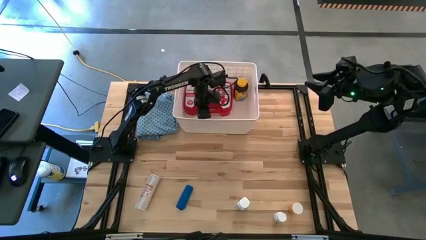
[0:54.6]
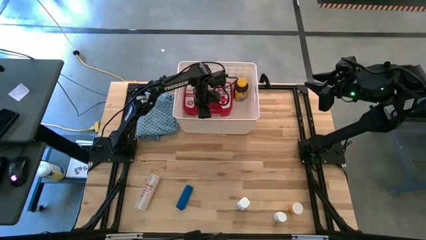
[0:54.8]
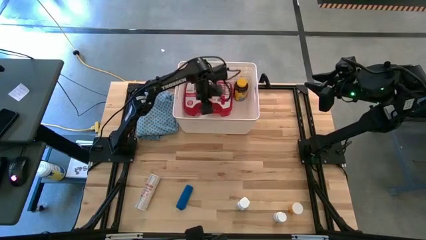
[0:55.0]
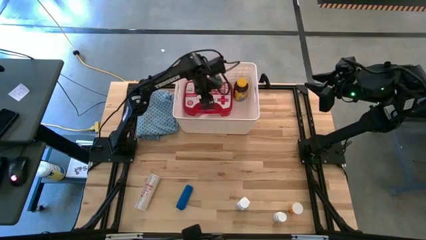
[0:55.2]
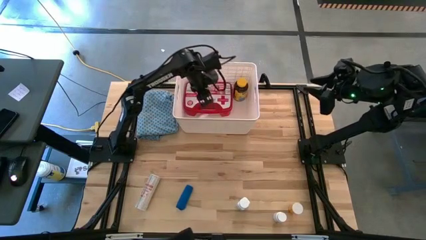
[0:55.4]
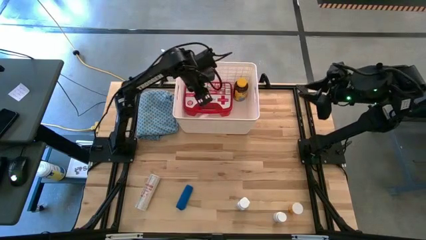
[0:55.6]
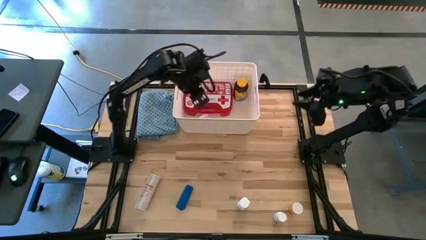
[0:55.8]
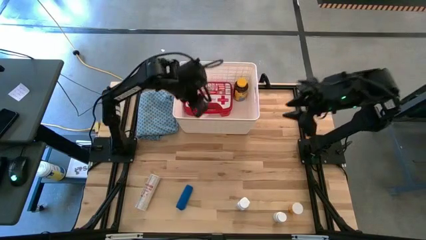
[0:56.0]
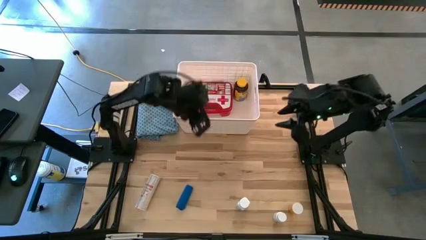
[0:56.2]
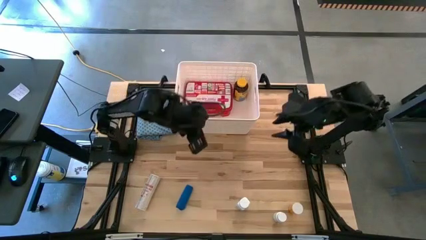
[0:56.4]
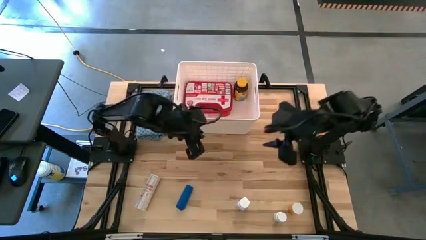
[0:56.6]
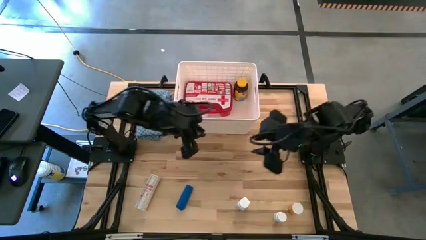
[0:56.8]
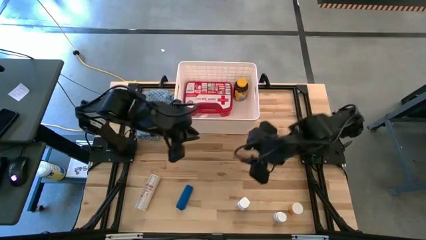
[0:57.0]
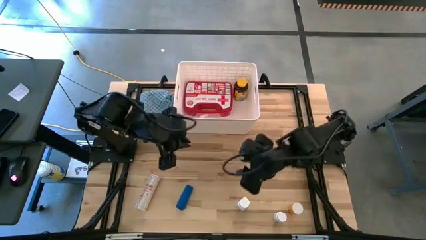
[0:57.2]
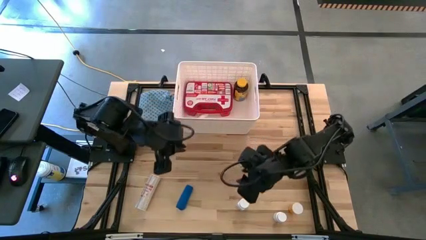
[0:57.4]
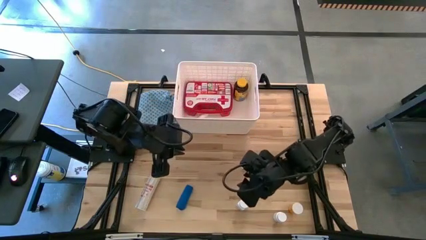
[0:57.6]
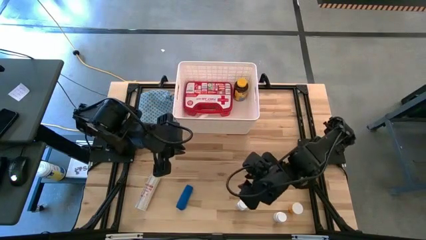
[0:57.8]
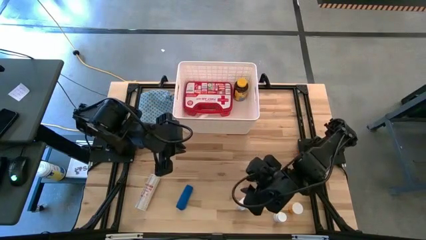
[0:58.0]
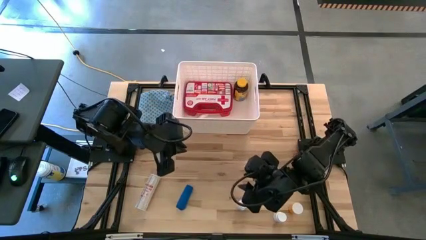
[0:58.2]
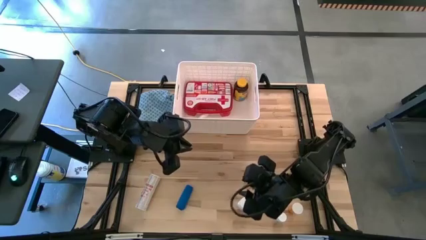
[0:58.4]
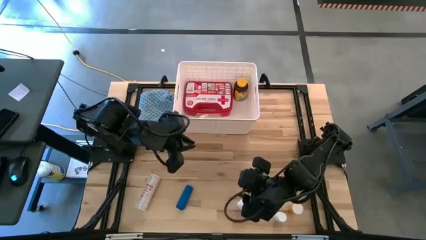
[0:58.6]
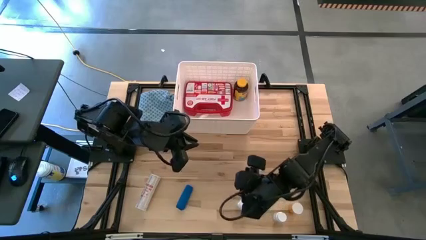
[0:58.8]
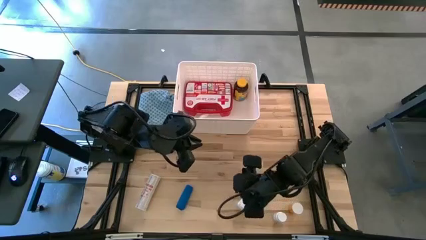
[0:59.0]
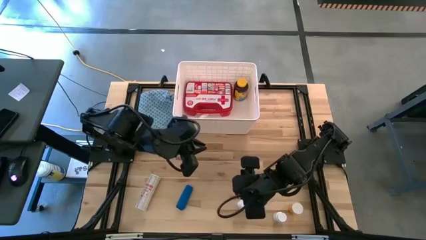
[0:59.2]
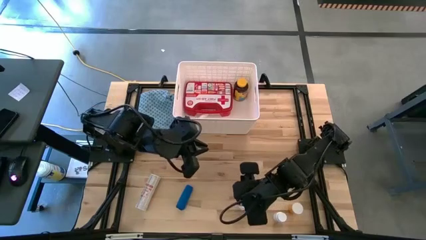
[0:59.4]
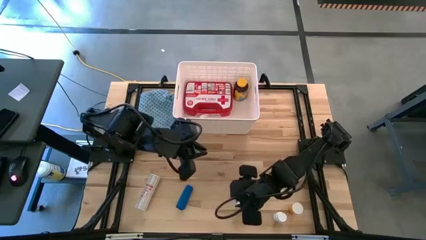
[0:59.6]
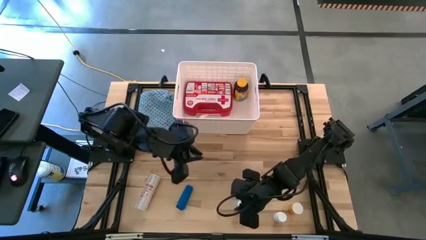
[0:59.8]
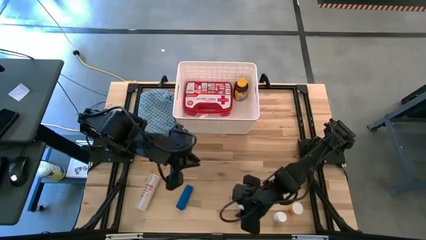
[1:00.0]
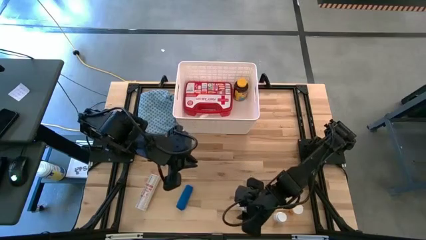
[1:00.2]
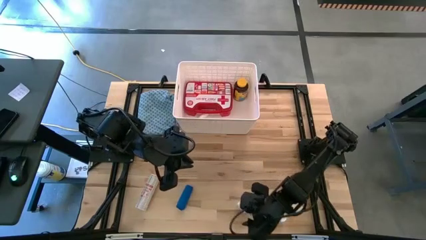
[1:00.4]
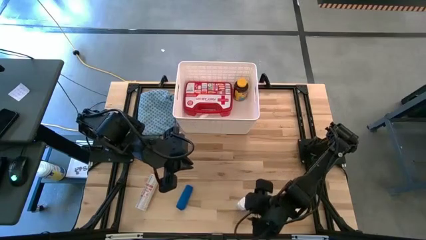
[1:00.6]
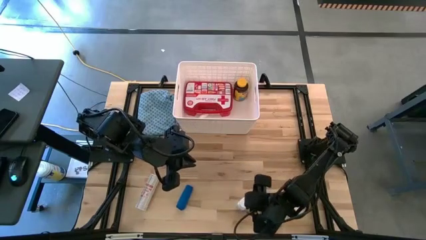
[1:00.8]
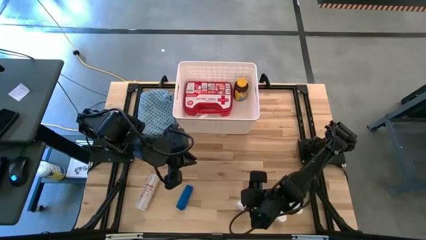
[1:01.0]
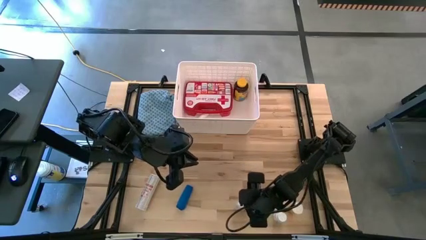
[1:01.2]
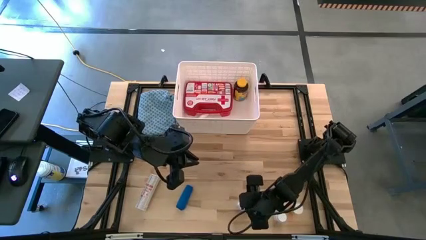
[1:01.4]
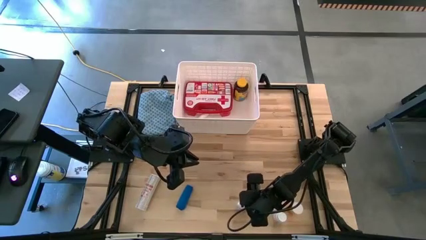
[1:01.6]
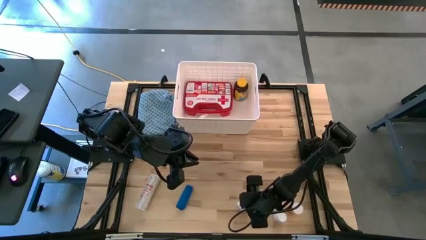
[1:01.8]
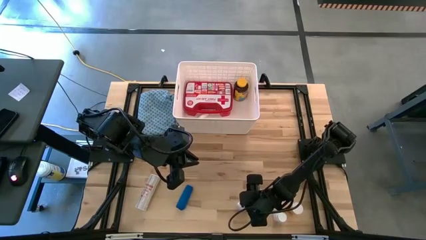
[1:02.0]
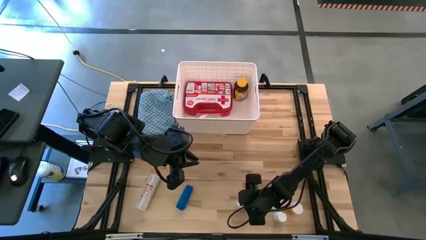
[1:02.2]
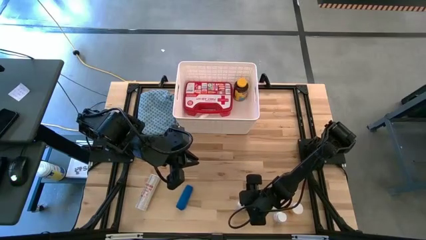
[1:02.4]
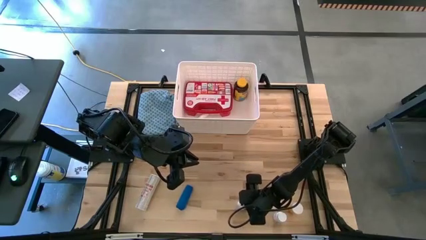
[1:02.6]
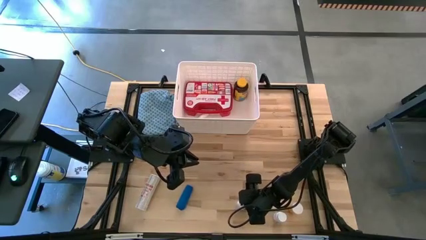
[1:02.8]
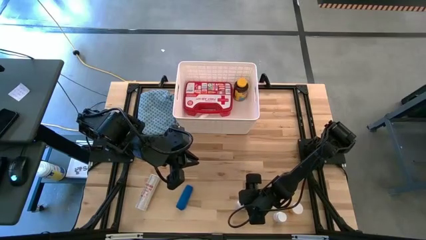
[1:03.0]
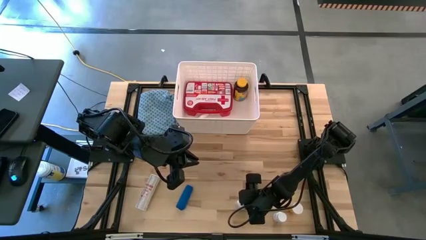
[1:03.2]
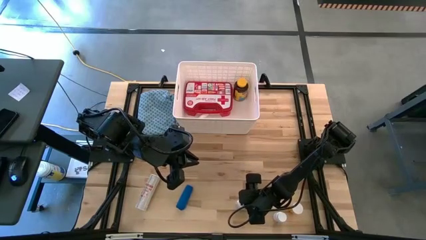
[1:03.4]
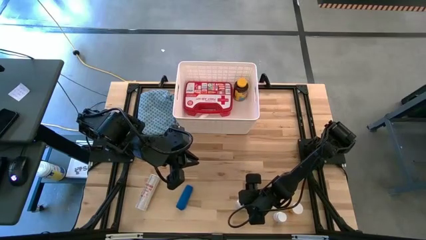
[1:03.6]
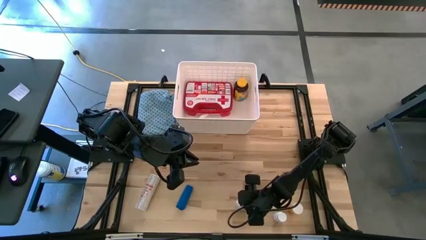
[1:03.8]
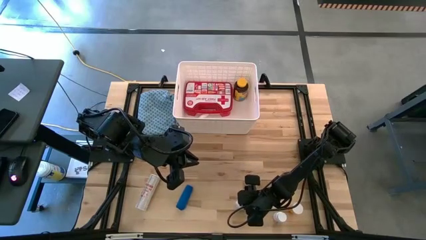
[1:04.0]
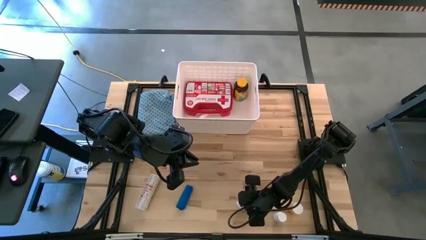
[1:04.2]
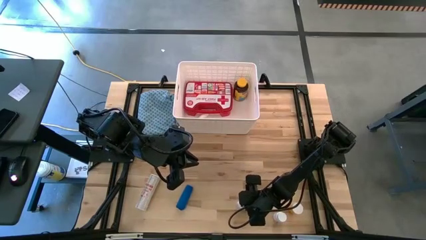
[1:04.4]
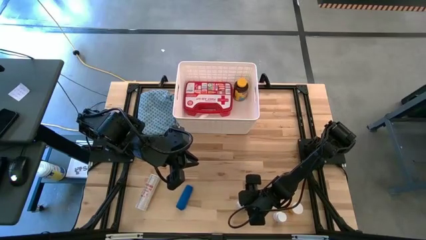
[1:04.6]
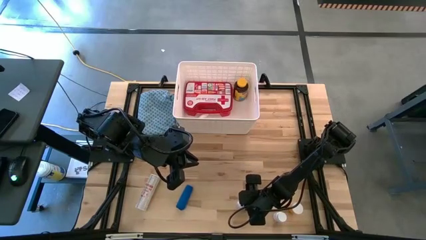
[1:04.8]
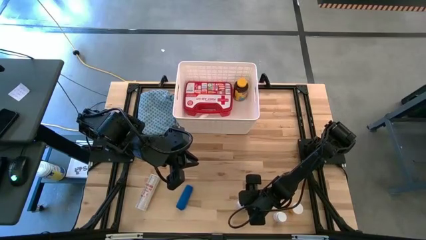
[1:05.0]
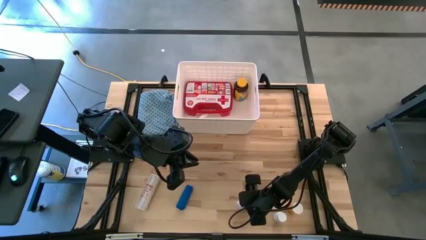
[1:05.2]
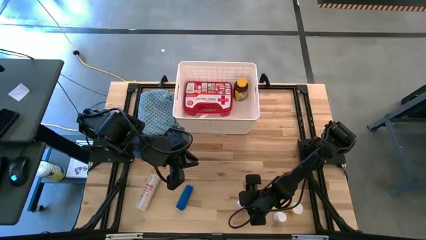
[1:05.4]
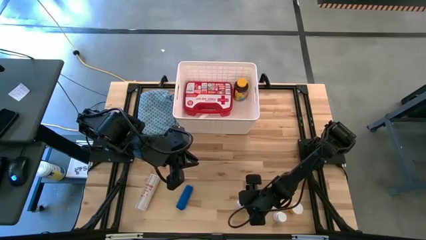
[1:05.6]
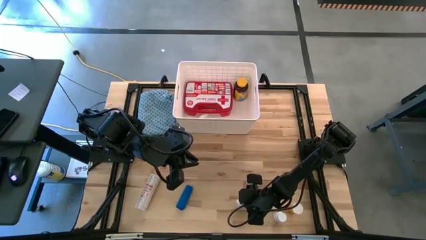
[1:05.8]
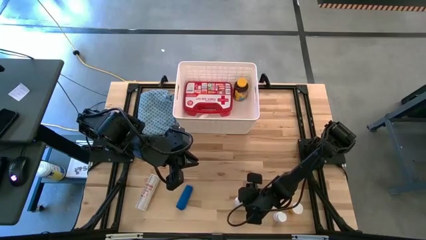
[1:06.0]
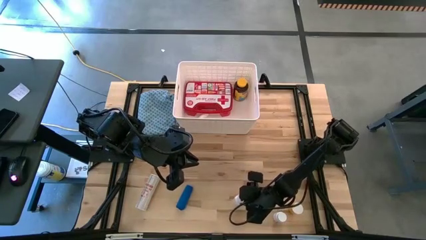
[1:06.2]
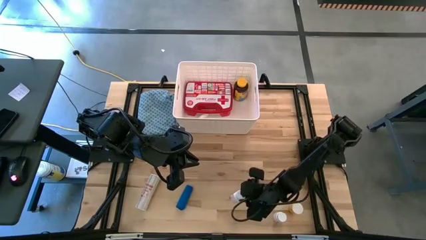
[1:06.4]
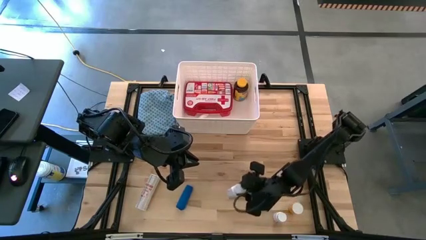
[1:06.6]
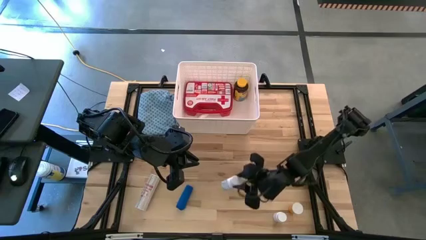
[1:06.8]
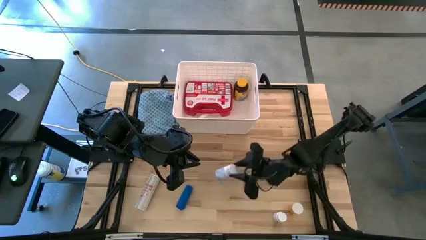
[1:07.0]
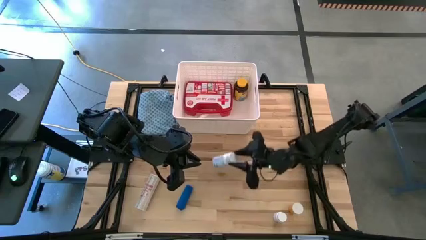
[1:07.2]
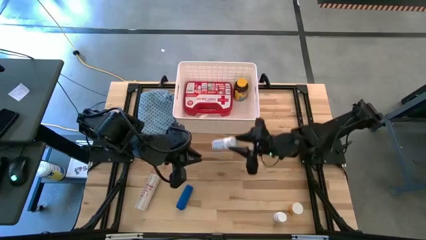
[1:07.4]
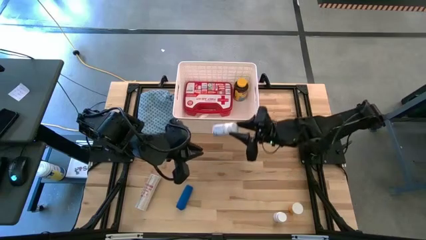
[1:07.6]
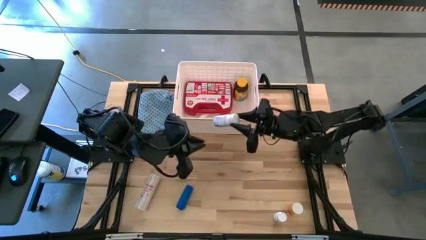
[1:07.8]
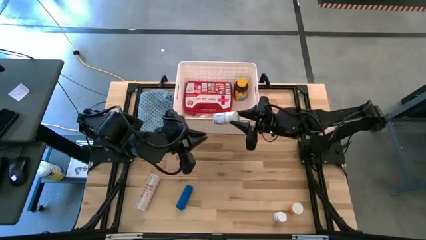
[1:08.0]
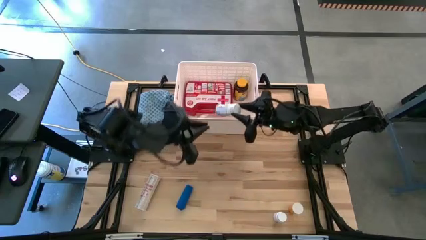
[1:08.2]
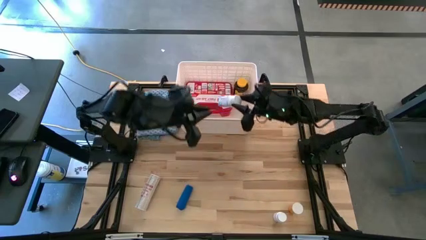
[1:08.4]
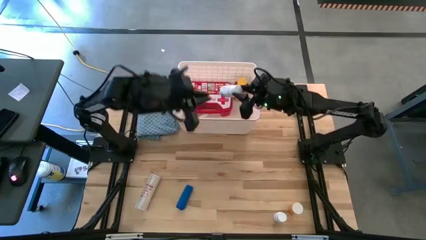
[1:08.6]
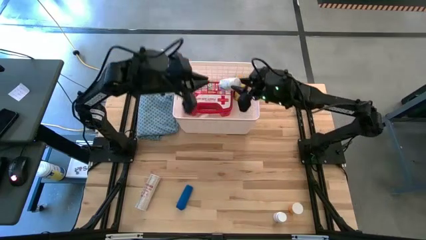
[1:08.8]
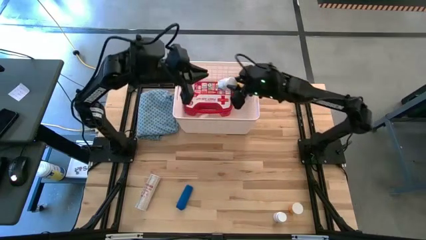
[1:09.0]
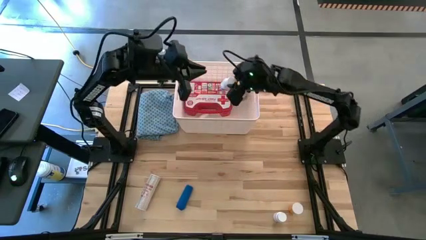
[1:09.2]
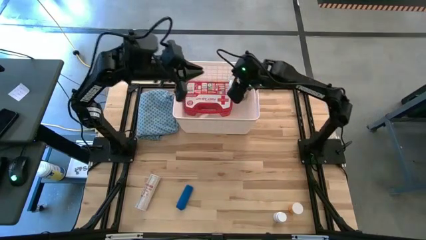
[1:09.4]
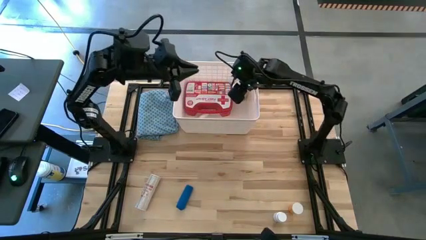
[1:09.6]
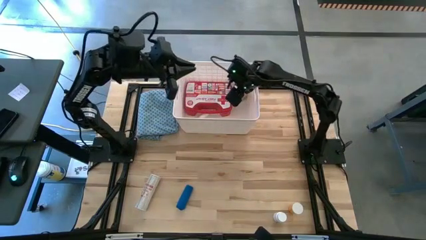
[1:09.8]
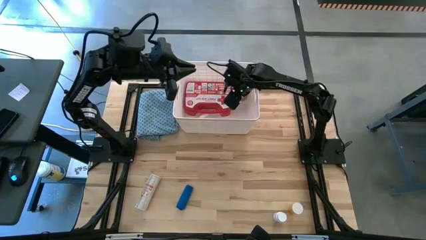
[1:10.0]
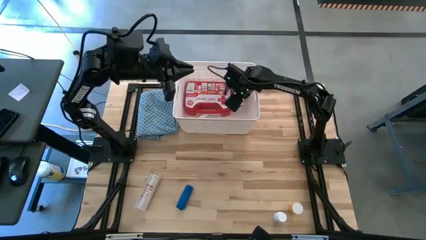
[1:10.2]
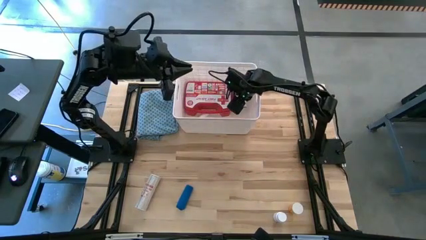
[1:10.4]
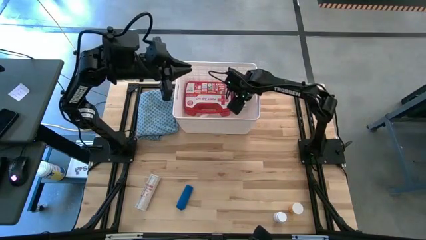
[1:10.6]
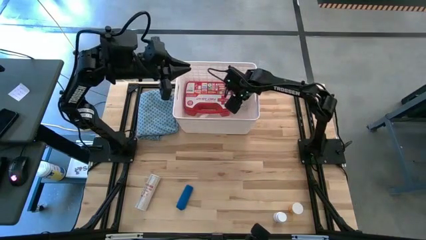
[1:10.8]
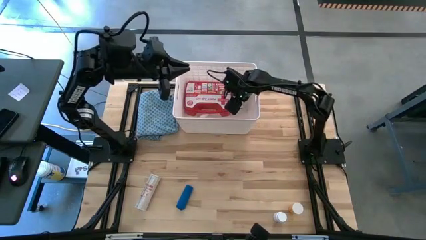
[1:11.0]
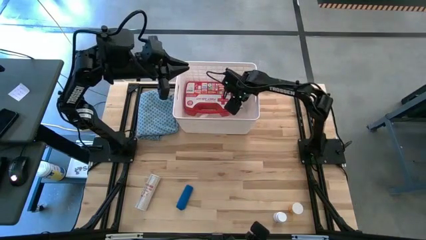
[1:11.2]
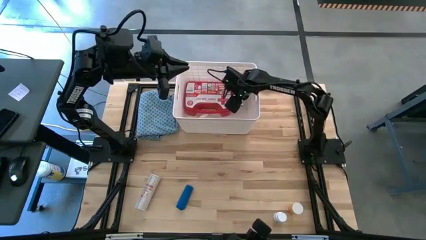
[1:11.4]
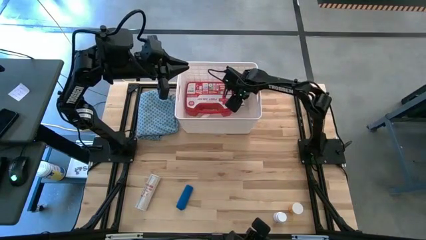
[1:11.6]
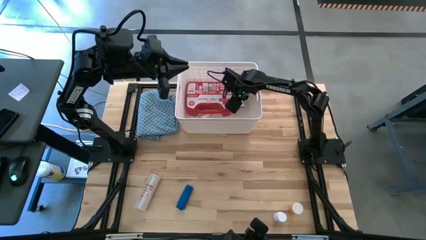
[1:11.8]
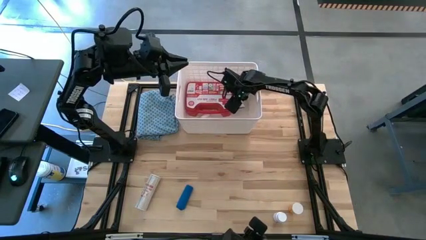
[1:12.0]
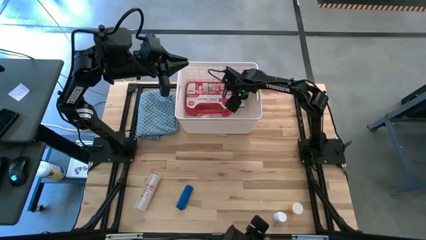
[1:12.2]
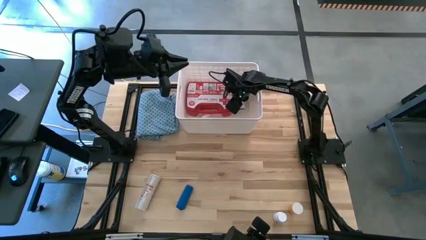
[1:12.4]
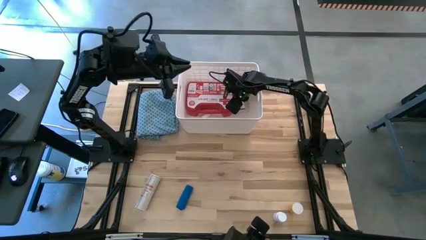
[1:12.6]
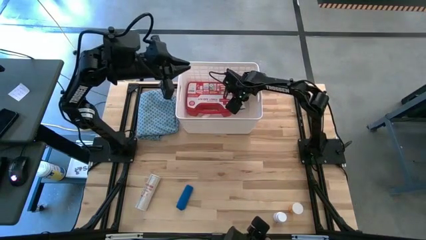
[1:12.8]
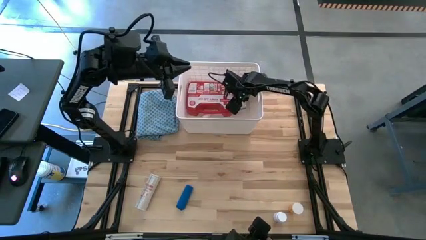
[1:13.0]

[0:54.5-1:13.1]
Task: Pick & place medical supplies in basket/bin
Put the left white pill bottle into the white bin
